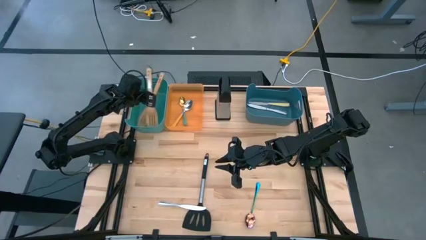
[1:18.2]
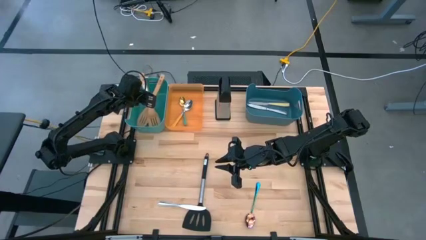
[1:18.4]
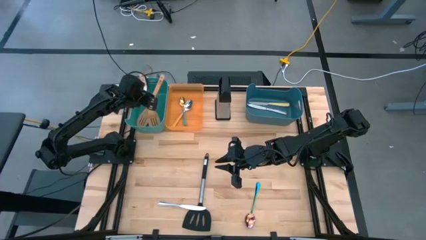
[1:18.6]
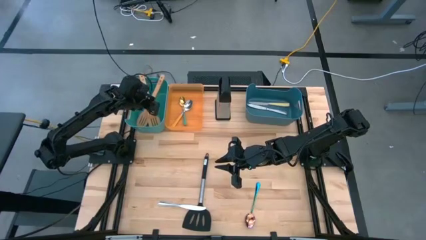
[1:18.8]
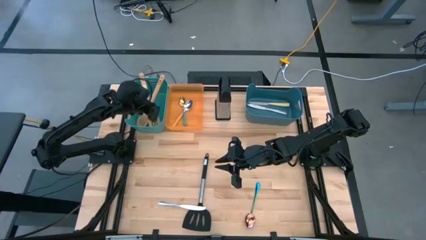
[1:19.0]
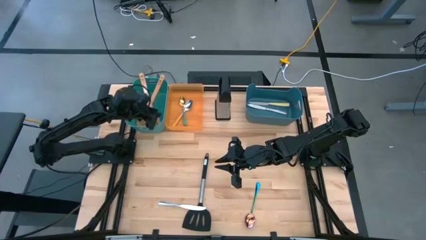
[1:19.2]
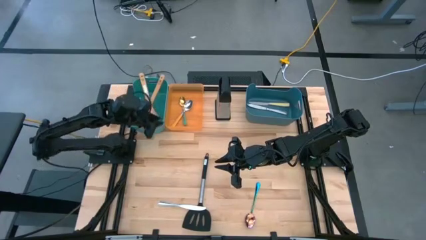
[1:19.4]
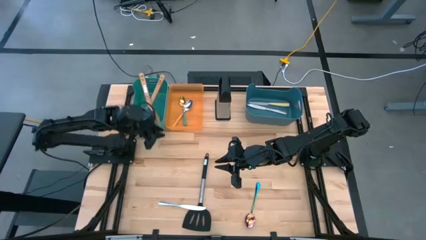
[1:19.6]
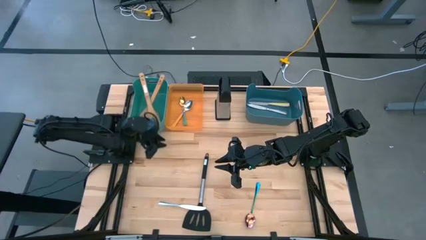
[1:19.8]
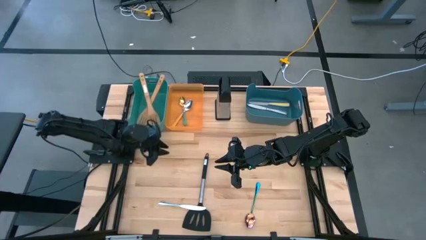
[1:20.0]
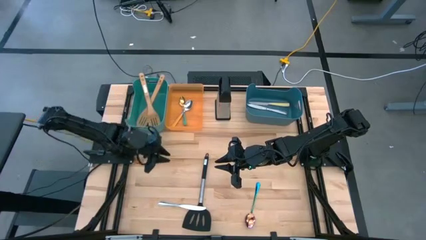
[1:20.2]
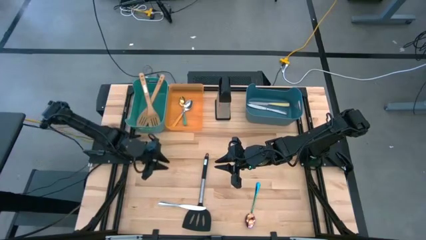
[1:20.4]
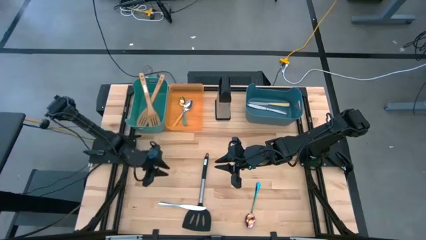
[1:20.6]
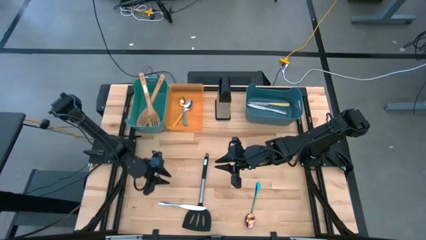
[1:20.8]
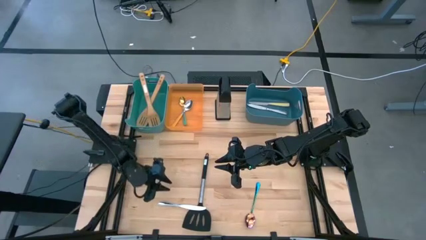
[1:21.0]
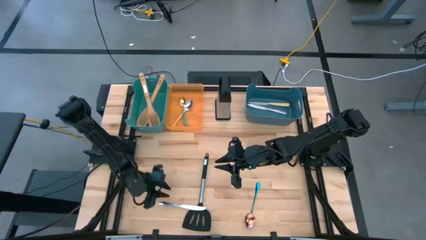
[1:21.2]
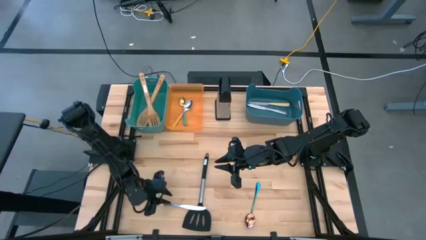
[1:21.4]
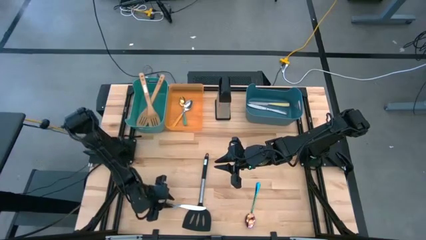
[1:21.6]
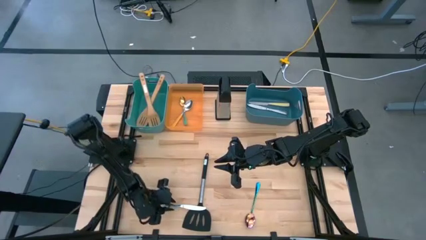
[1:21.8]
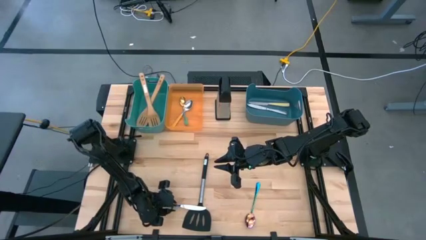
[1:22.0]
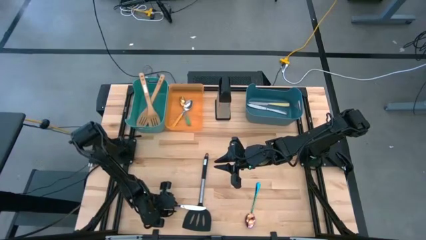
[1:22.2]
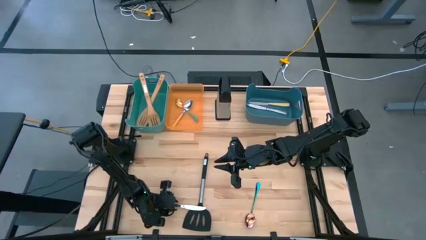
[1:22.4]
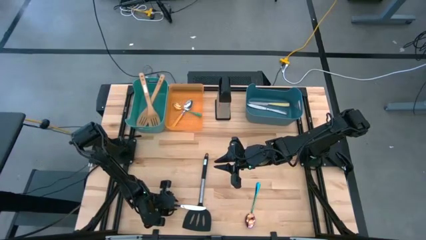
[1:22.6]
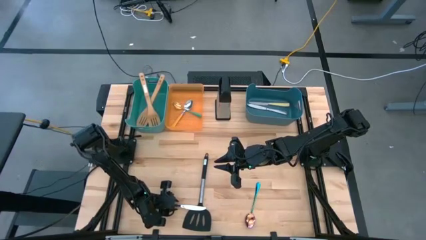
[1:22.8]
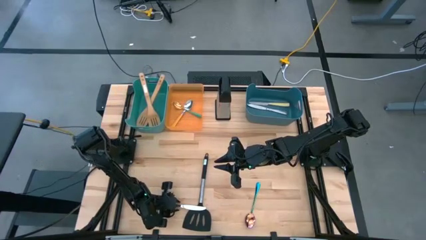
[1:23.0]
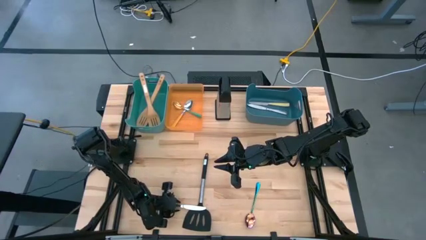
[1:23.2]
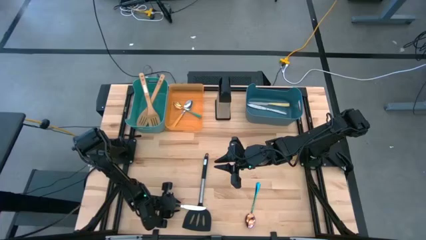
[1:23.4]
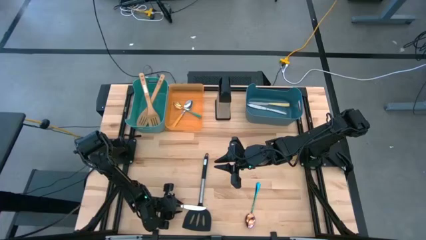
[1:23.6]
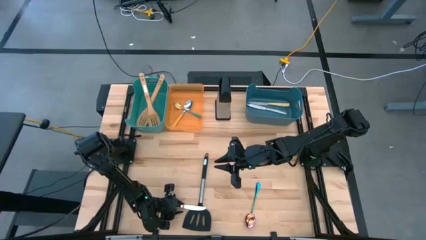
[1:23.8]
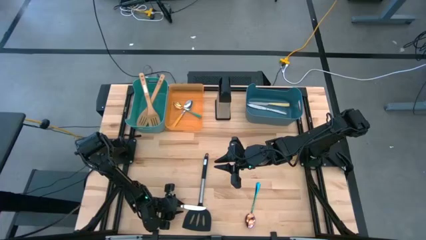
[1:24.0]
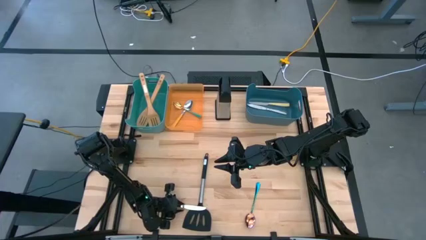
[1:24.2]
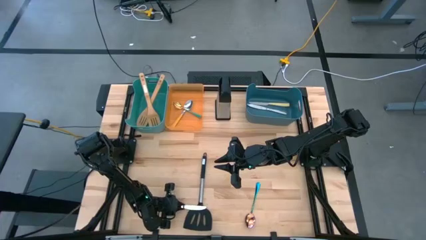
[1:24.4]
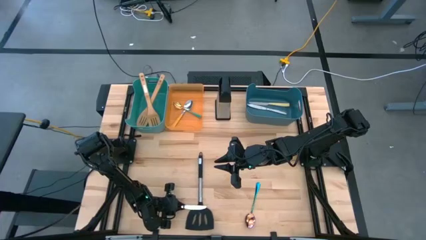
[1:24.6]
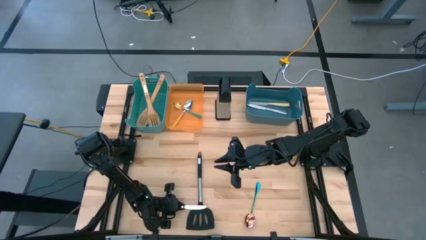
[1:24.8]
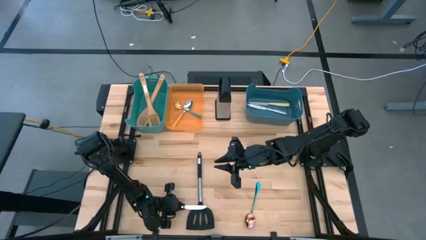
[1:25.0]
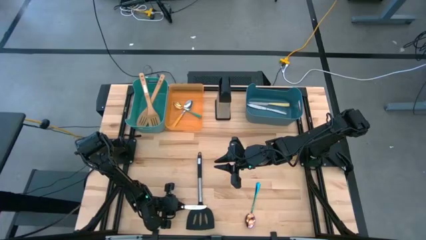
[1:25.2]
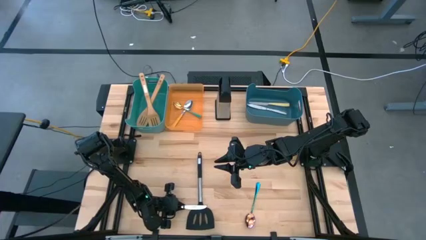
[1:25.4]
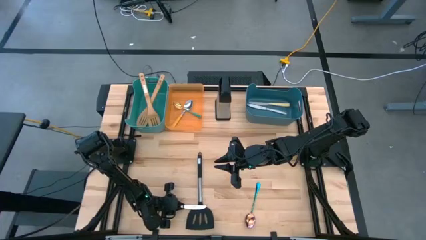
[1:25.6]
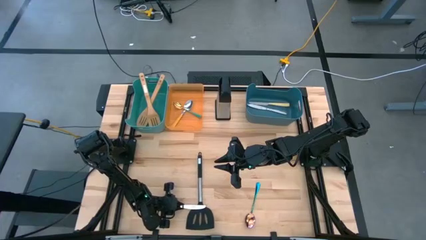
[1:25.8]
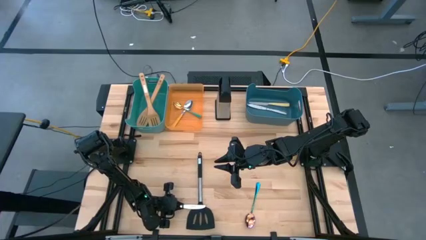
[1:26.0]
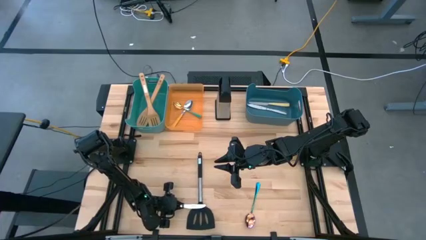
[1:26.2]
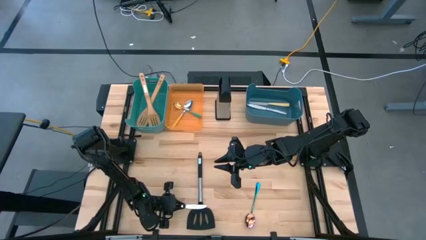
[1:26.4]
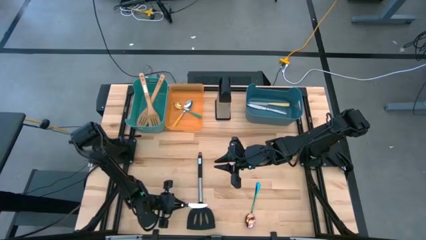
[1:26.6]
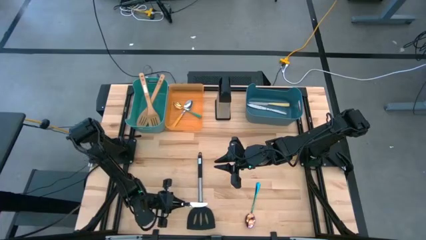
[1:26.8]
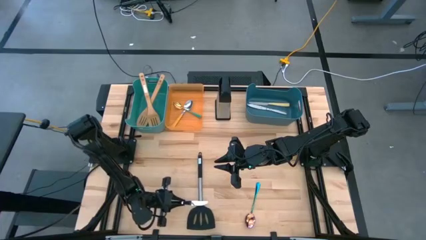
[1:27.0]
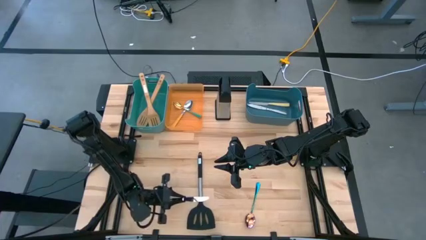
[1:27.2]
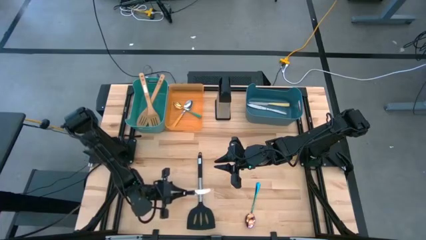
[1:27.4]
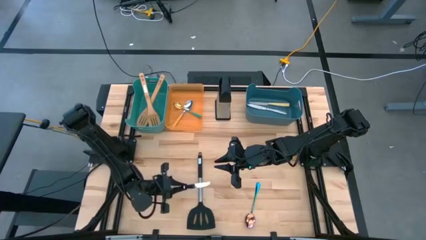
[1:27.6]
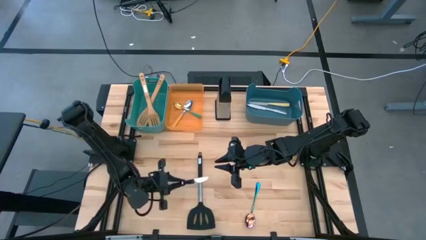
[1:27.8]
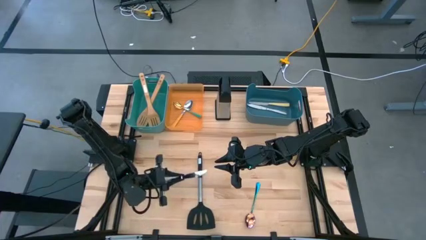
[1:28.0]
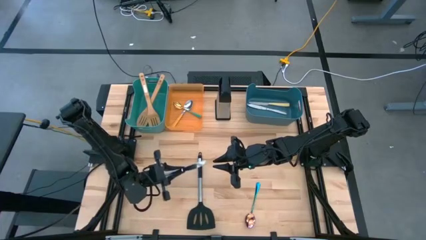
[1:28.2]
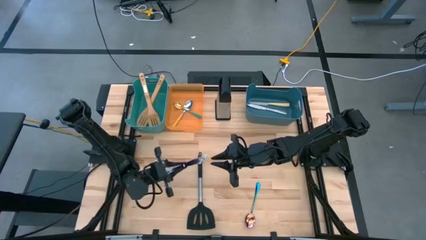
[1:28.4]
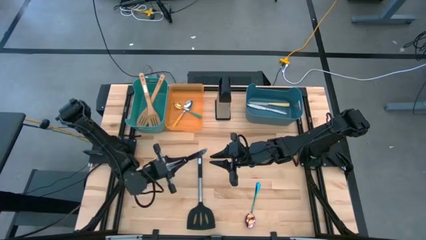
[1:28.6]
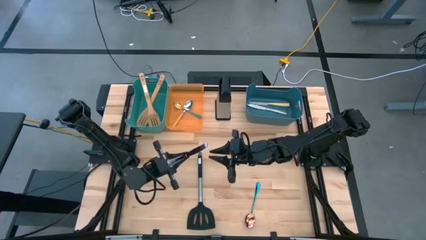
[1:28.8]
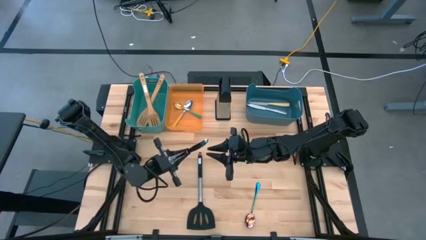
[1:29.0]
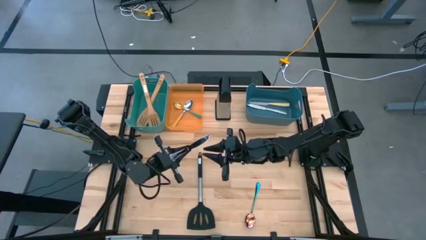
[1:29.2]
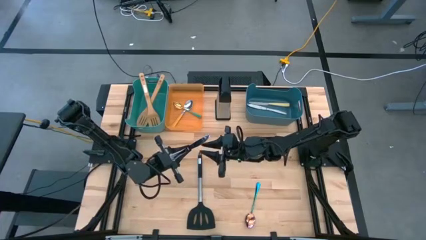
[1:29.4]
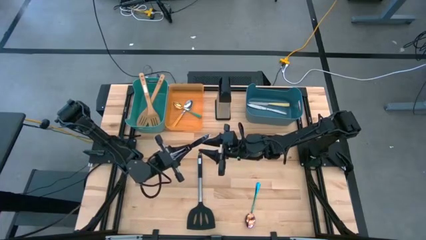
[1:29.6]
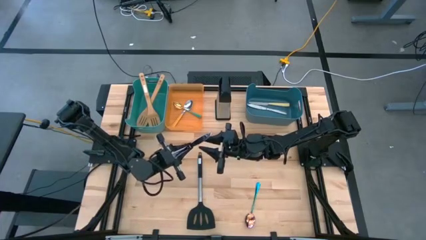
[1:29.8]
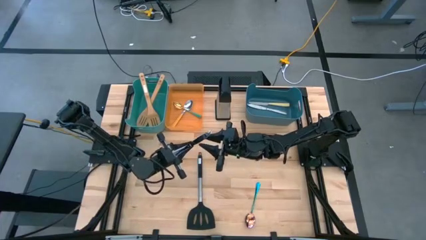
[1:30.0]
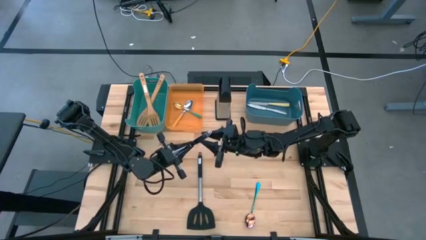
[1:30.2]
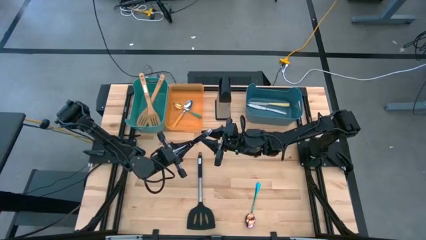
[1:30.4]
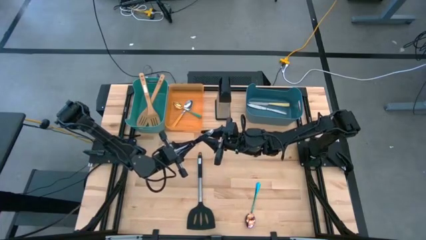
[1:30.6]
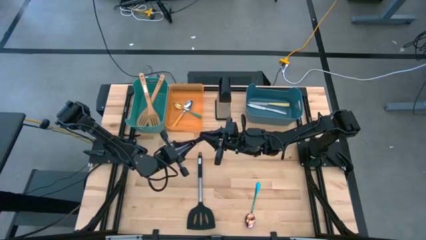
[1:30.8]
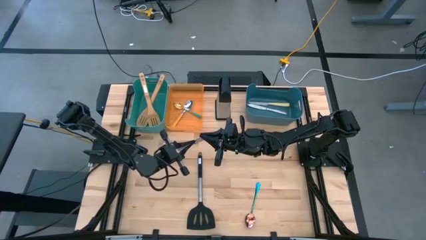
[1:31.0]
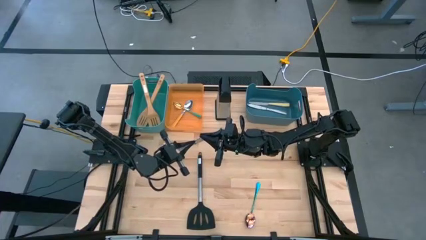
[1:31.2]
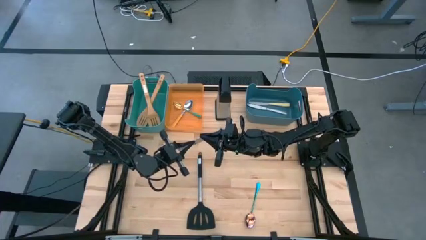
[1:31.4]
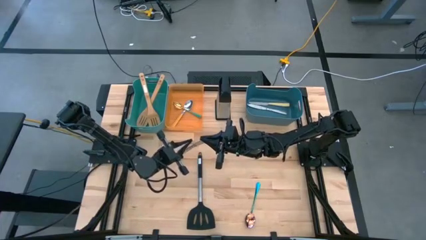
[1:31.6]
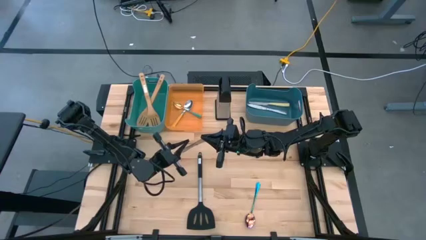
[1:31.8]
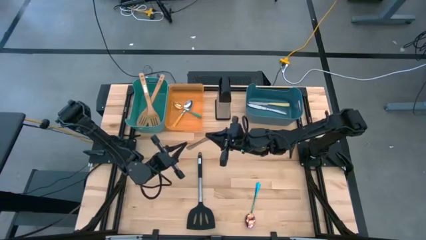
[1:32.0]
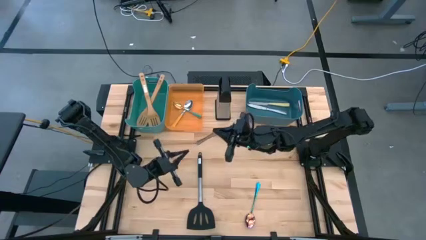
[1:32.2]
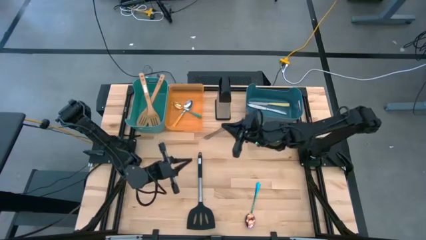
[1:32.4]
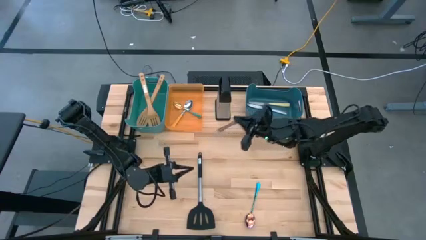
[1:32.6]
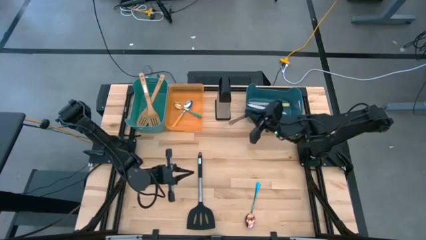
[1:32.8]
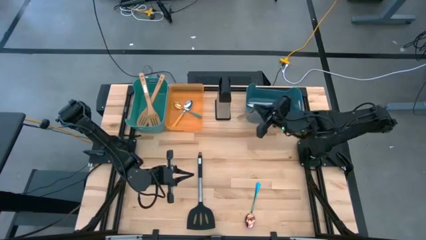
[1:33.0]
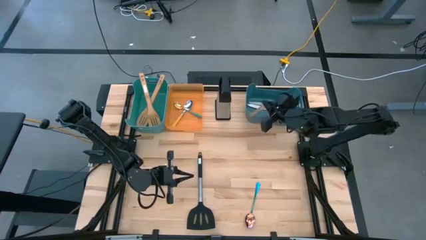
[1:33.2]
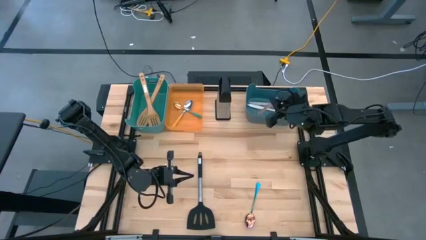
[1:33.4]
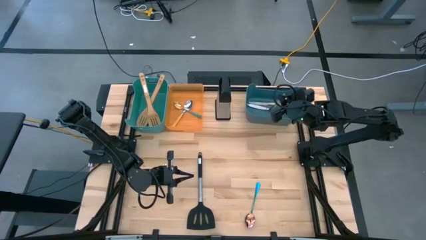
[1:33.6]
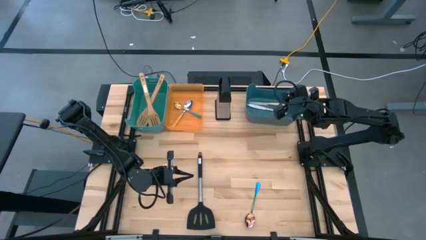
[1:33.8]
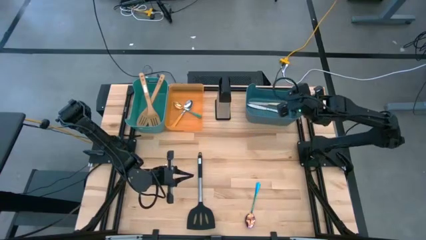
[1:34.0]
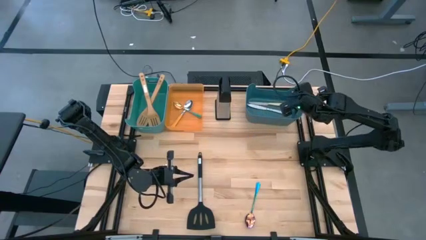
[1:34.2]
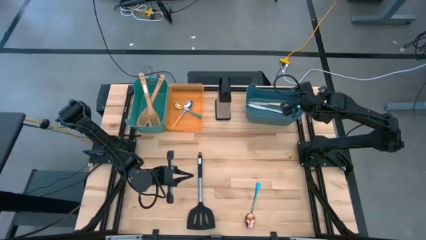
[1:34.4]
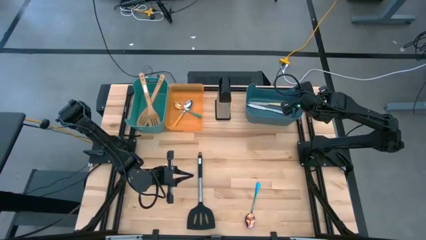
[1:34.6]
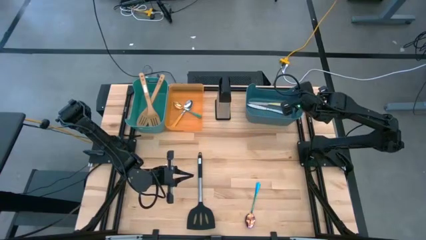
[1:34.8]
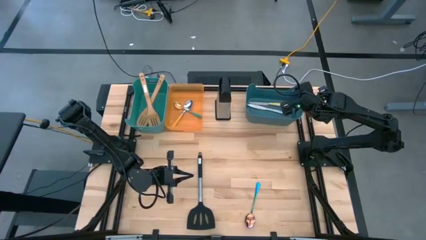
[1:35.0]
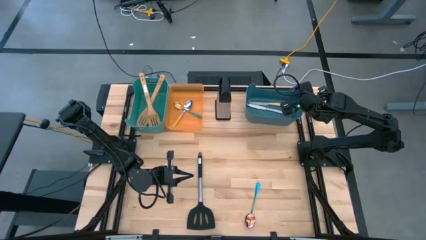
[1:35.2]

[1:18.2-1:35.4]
Task: Pick & Place Kitchen Items
Put the silver table knife into the blue bin
